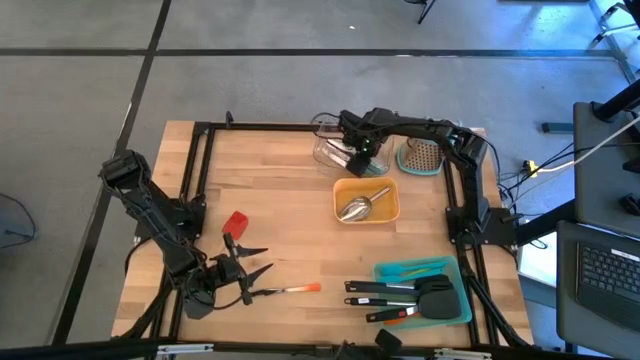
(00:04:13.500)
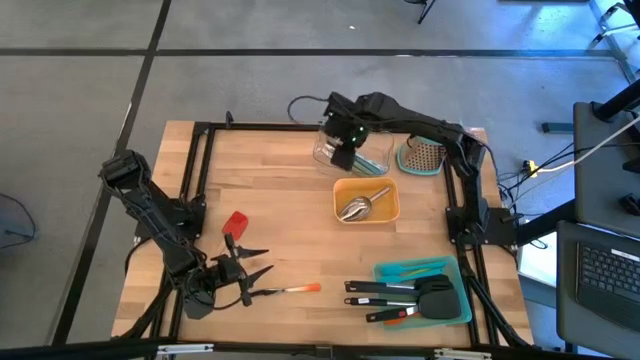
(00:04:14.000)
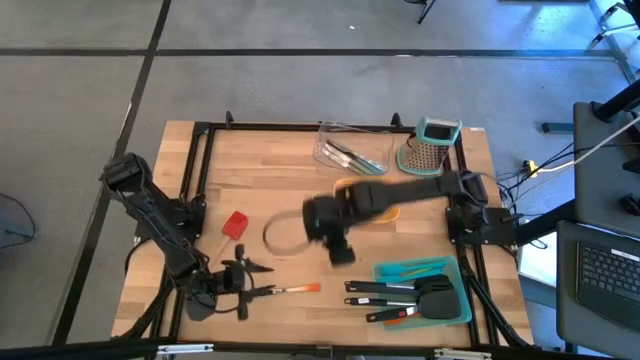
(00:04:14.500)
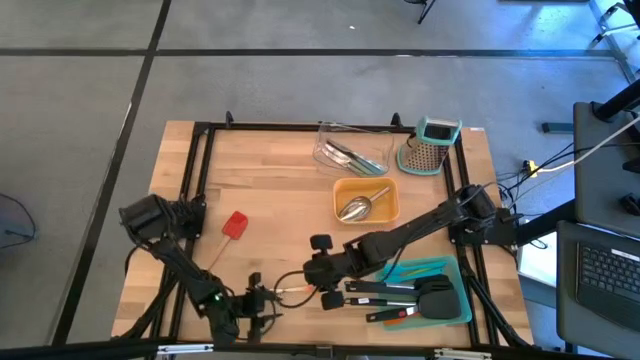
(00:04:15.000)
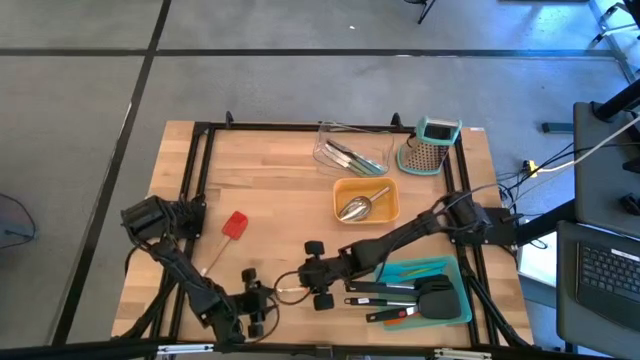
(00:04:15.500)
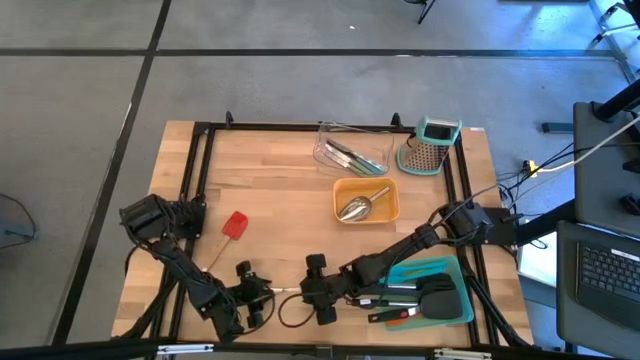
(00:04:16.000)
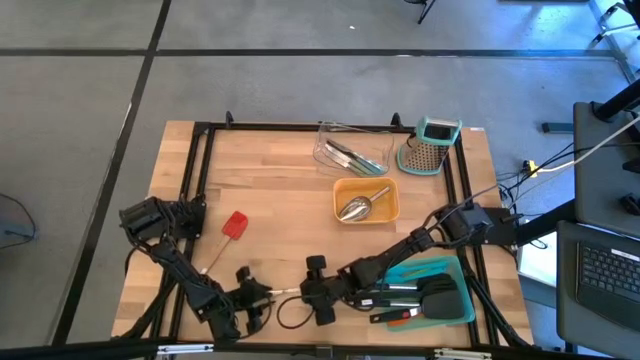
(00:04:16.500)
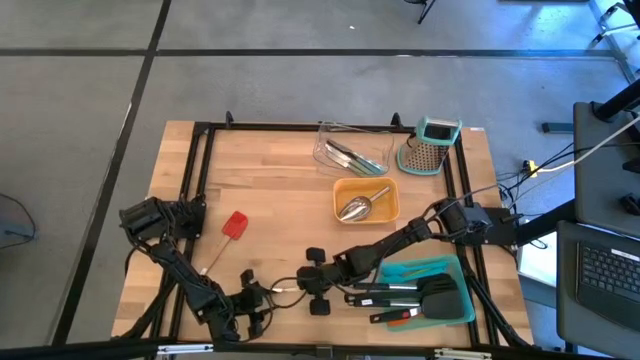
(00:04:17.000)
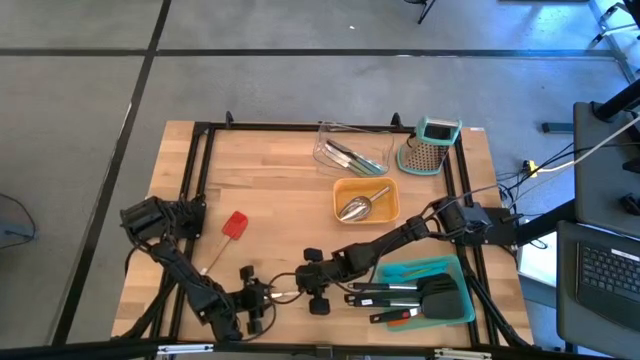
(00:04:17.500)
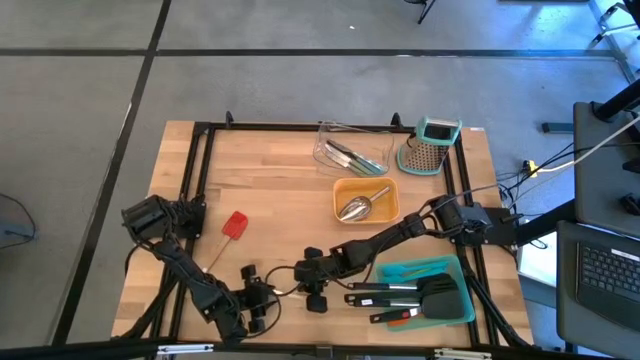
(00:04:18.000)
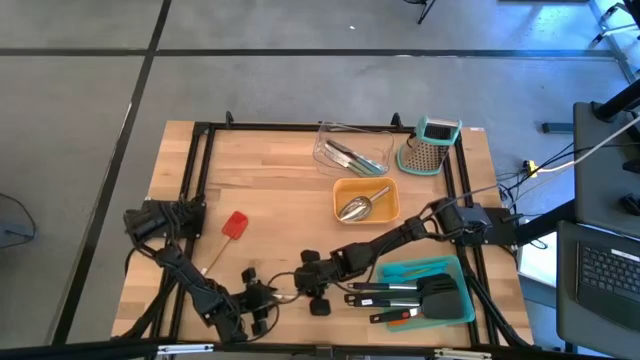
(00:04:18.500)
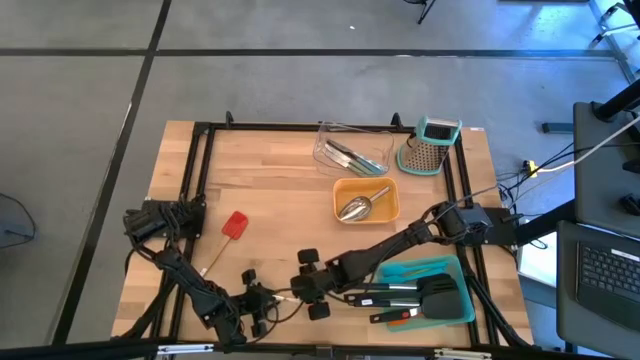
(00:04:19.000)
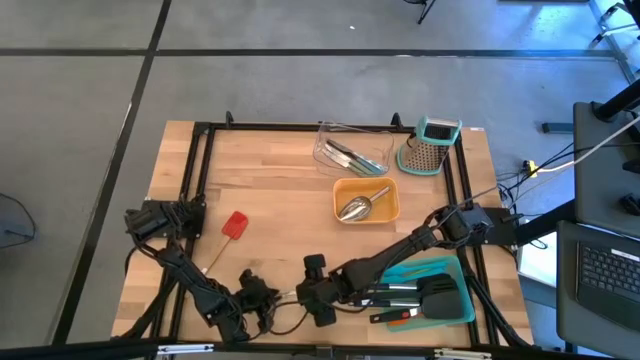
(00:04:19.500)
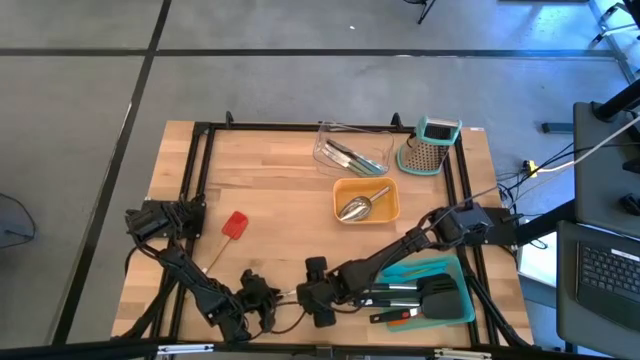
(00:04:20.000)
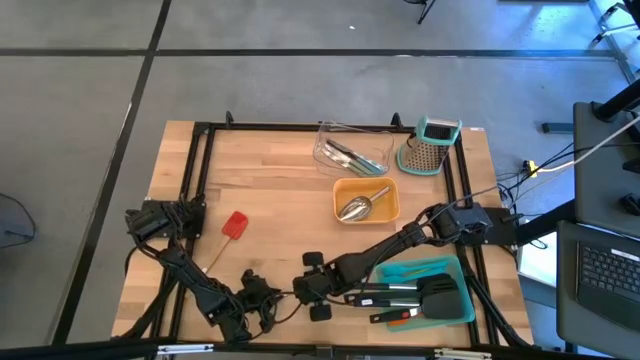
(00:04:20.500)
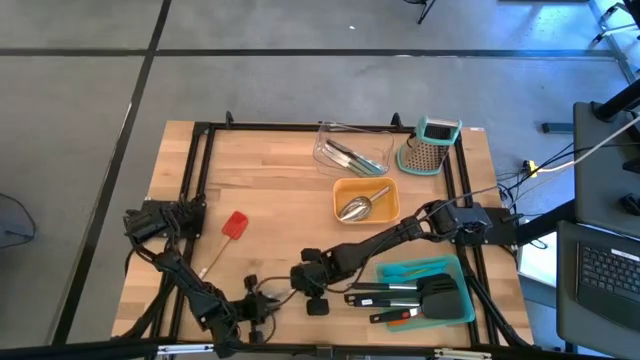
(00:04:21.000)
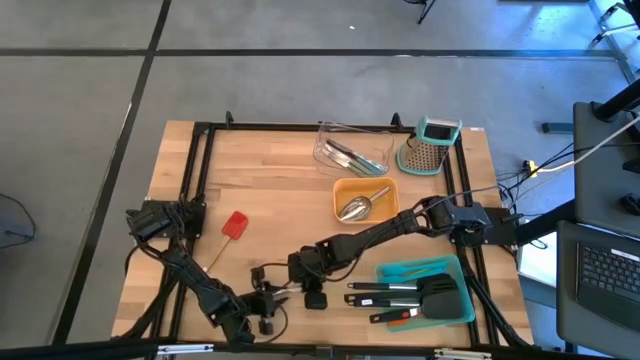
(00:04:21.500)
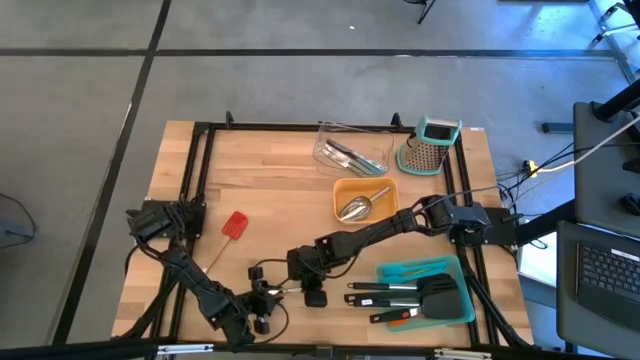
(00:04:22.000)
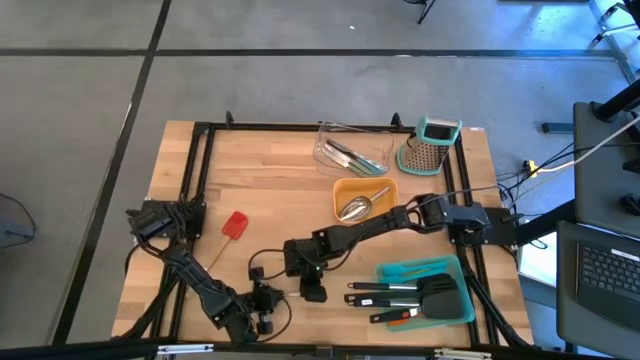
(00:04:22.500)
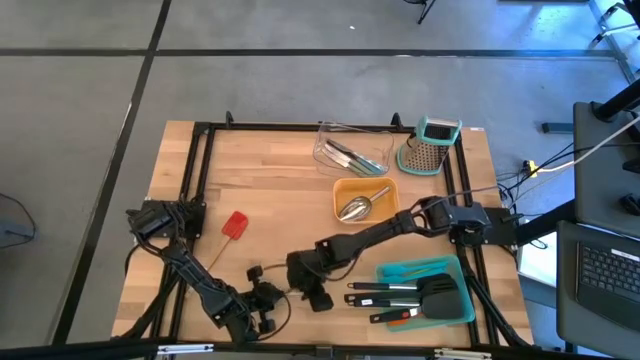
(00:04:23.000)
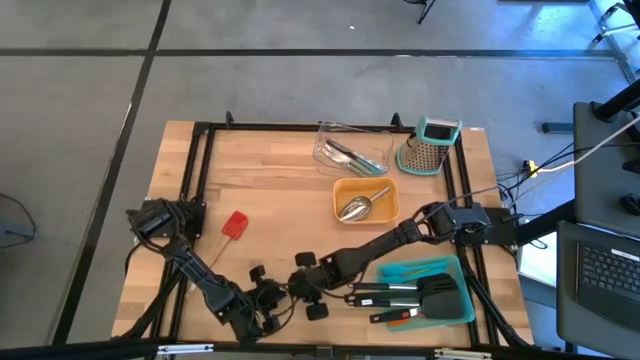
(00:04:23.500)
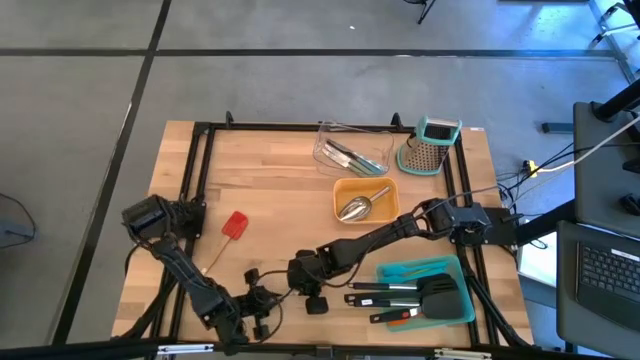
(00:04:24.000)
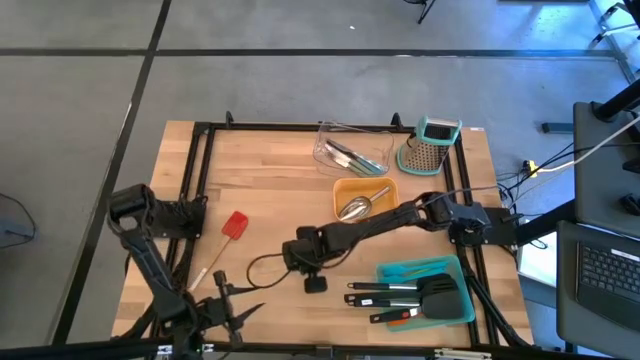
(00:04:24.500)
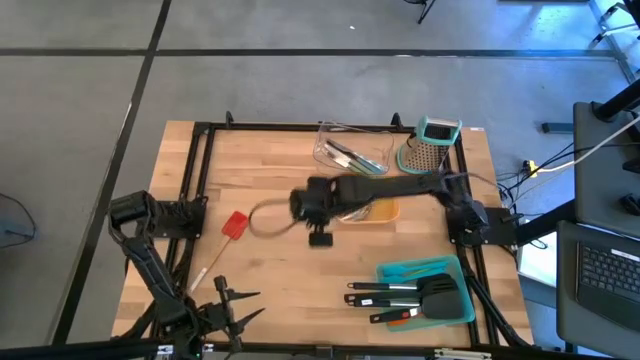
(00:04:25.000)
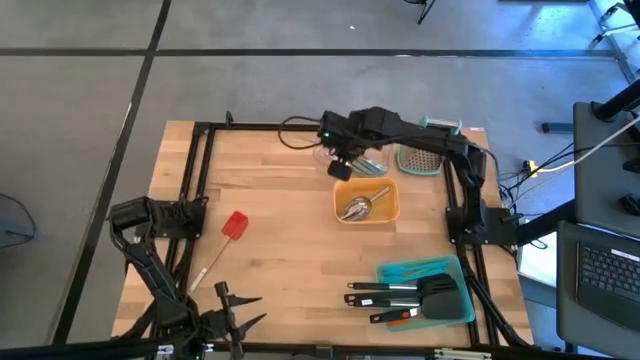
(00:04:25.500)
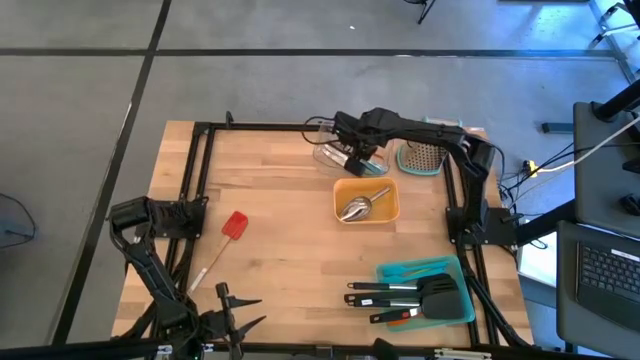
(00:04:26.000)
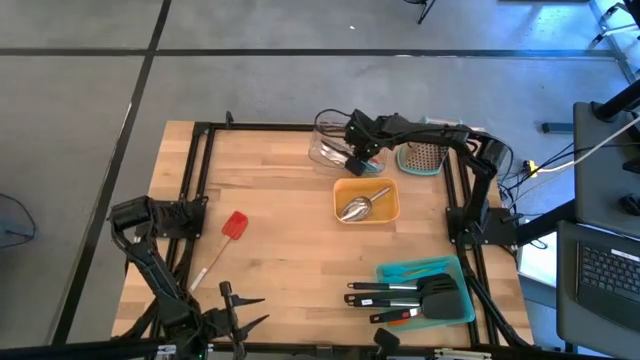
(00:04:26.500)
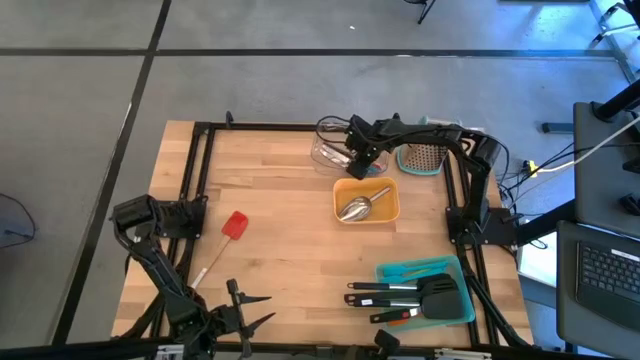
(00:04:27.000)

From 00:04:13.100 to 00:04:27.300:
Task: Pick & Place Kitchen Items
Put the orange knife into the transparent bin

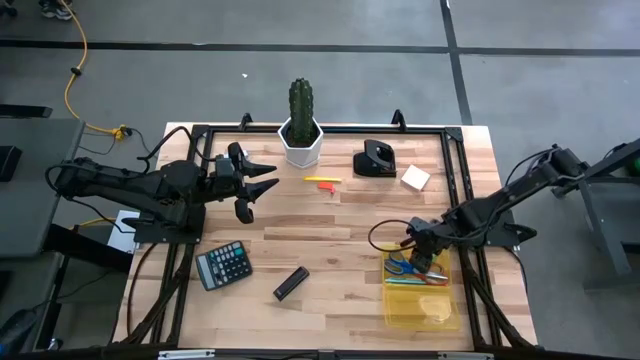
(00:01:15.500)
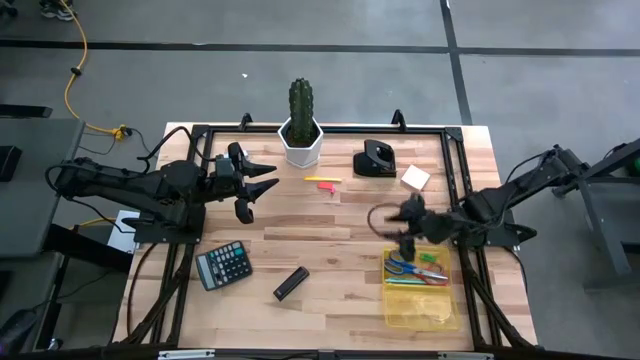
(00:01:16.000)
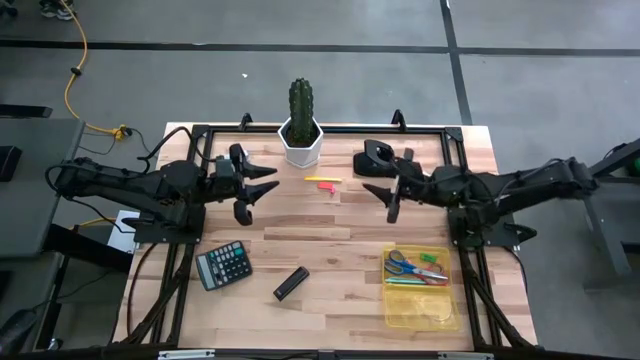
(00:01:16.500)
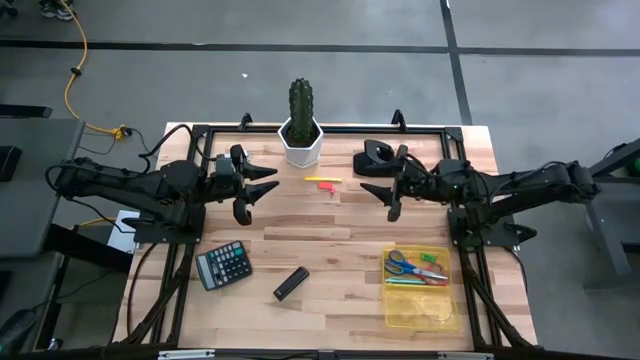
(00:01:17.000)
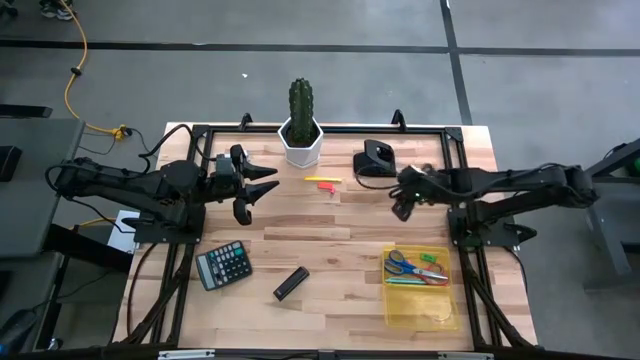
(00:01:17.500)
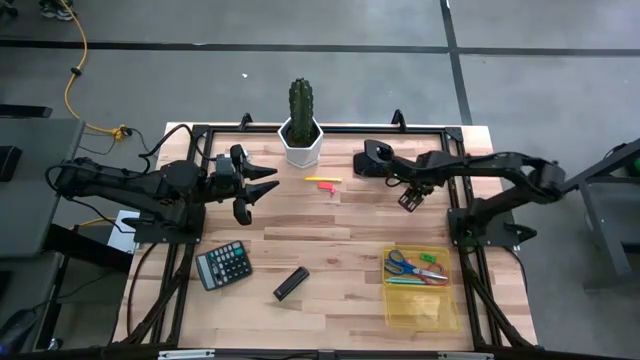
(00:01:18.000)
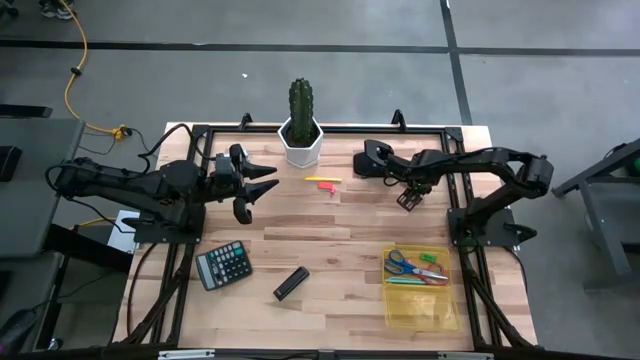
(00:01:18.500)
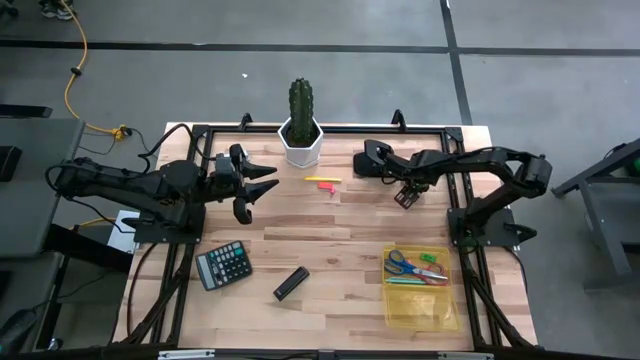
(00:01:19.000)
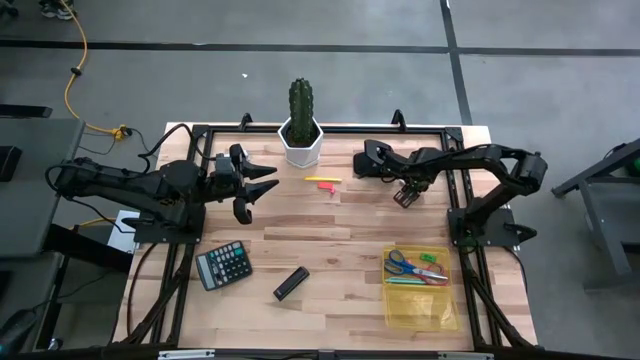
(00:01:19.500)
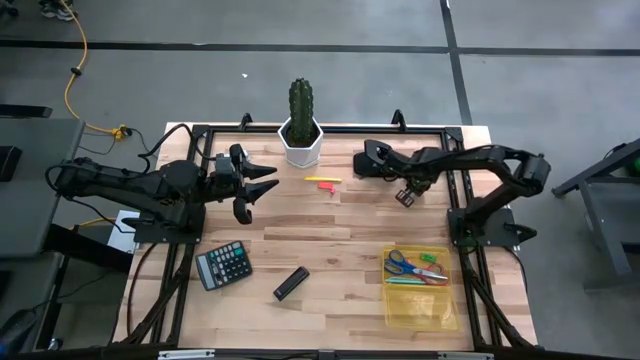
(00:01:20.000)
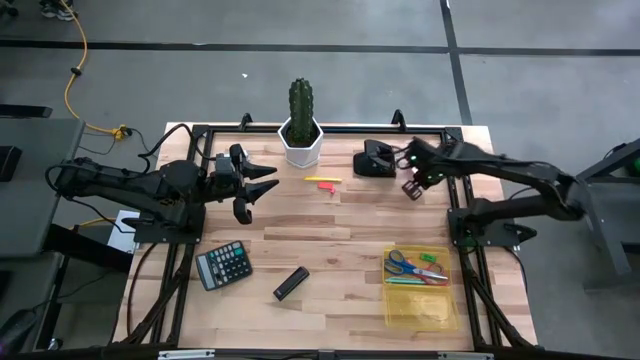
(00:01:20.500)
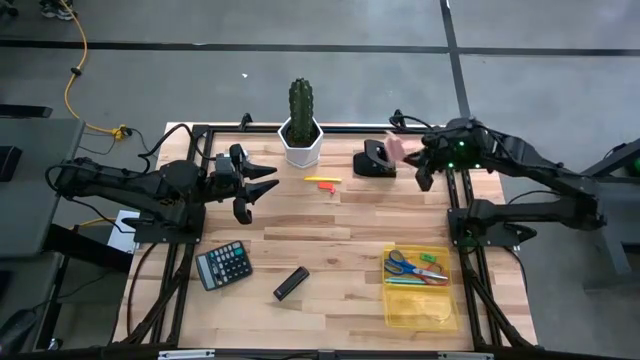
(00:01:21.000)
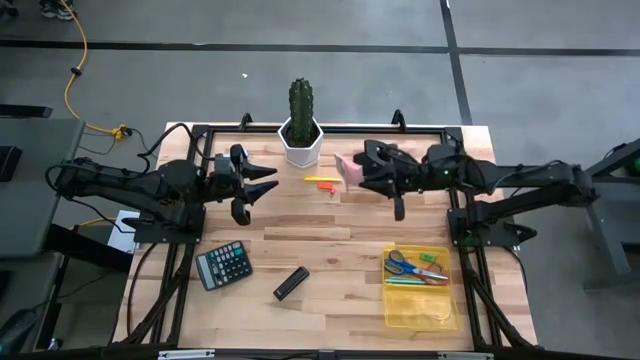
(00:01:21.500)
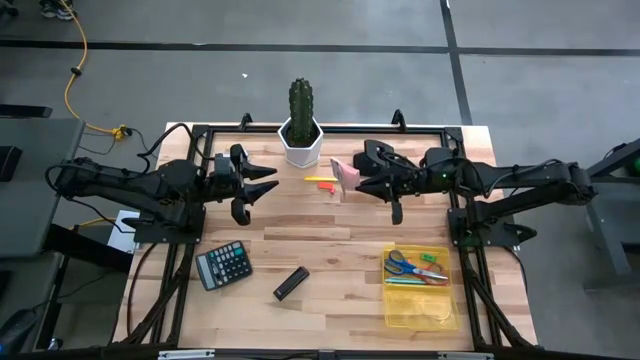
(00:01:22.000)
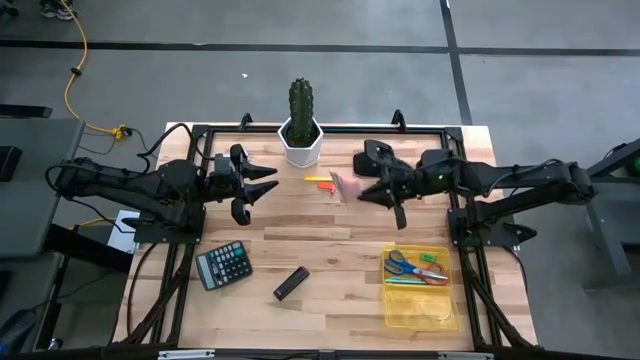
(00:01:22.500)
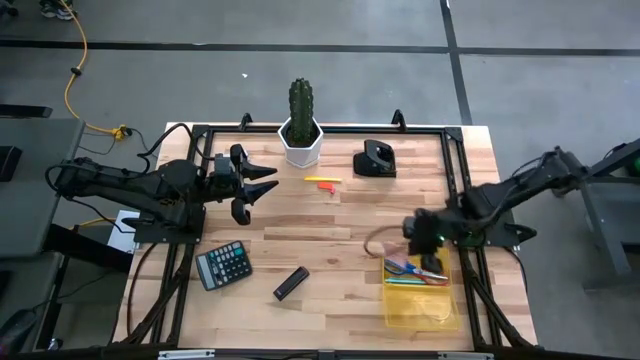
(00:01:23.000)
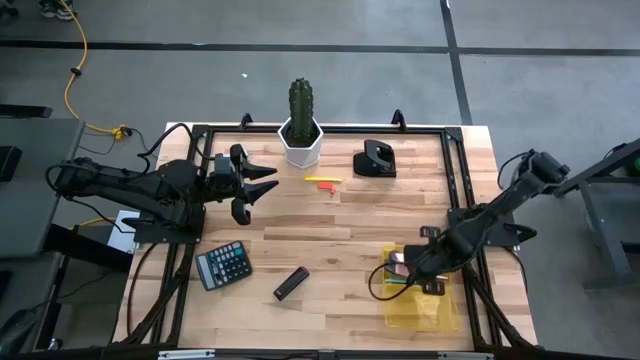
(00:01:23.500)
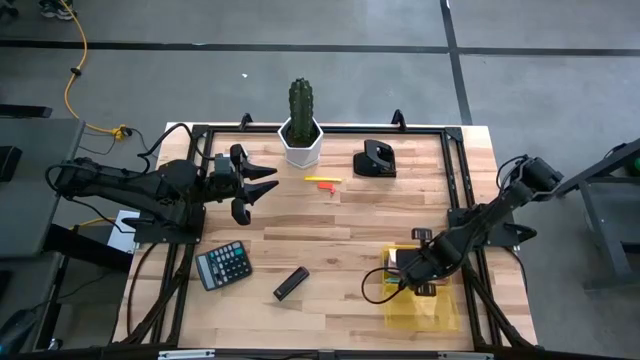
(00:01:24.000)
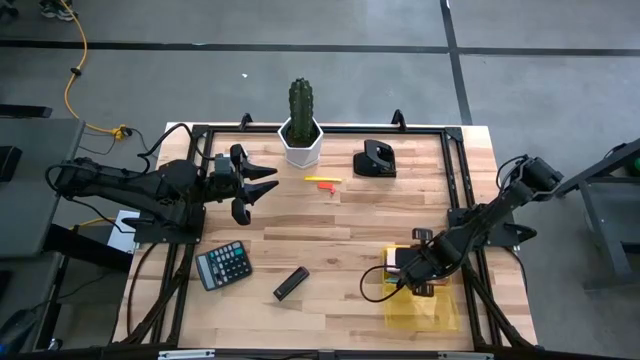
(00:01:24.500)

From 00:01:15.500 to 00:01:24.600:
Task: Pack school essentials
Put the sticky note on the yellow supply box
